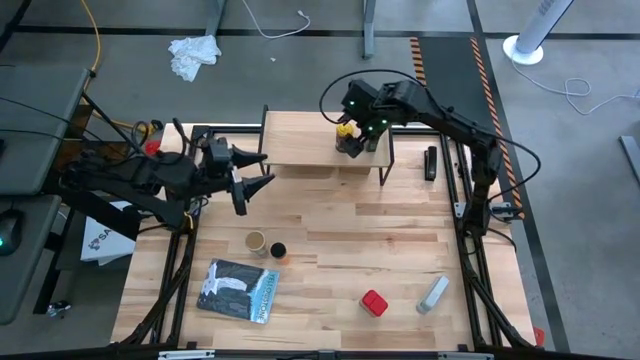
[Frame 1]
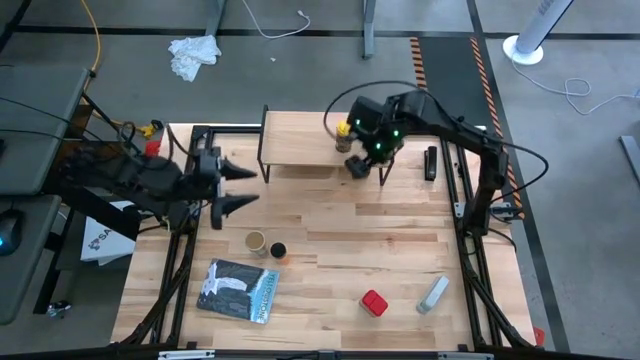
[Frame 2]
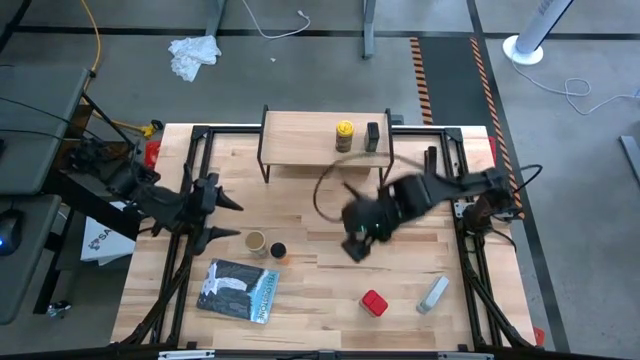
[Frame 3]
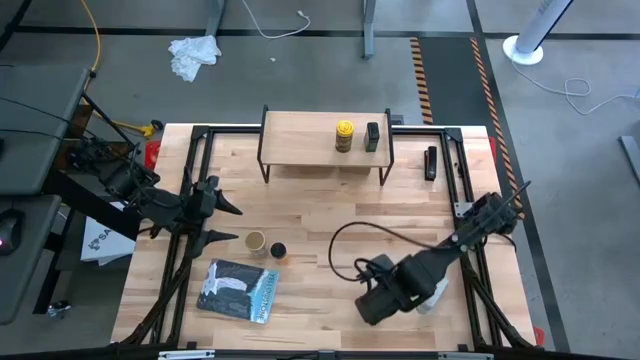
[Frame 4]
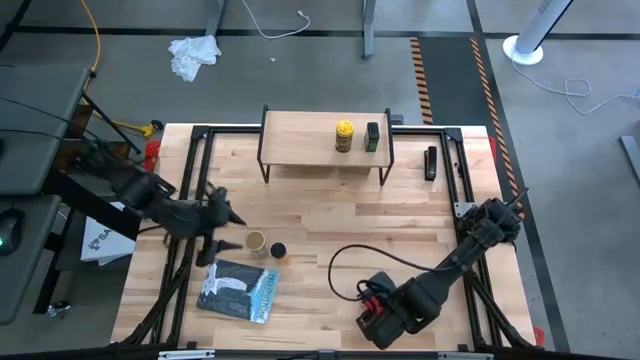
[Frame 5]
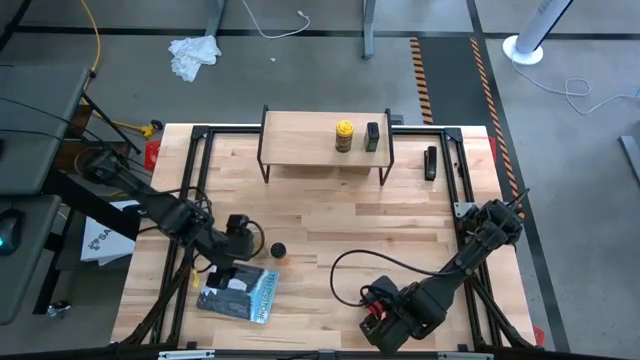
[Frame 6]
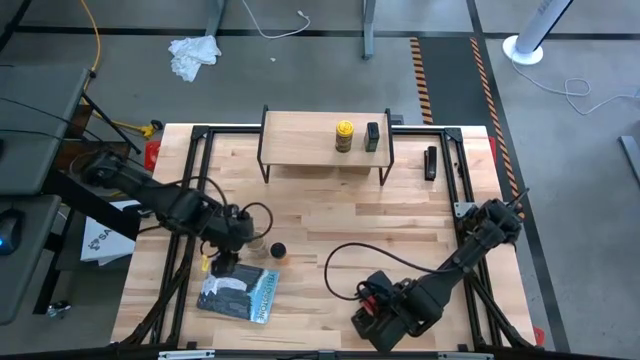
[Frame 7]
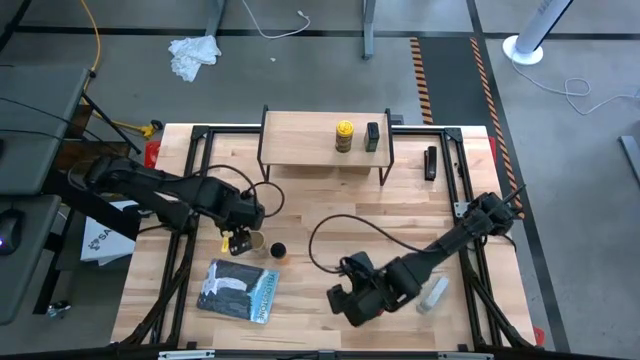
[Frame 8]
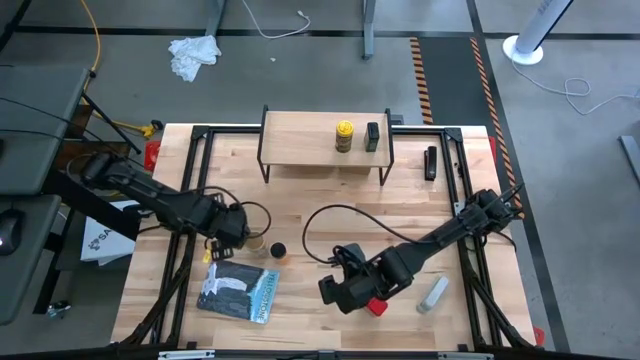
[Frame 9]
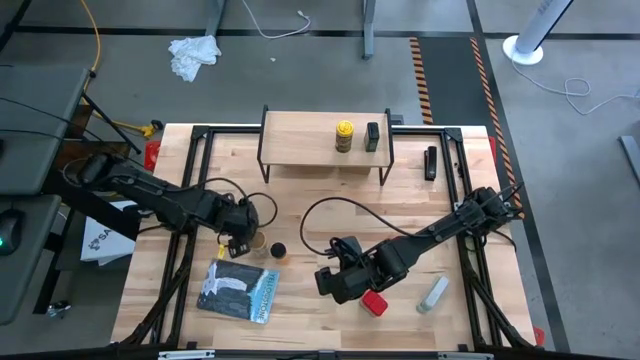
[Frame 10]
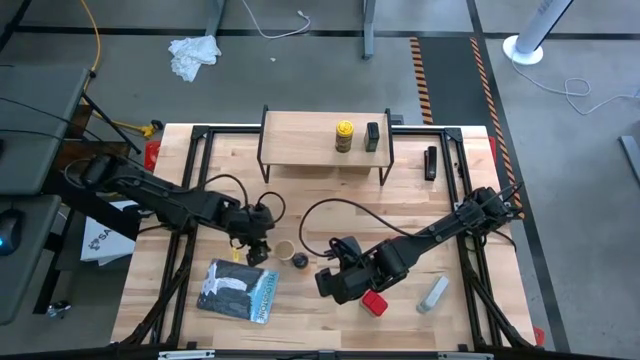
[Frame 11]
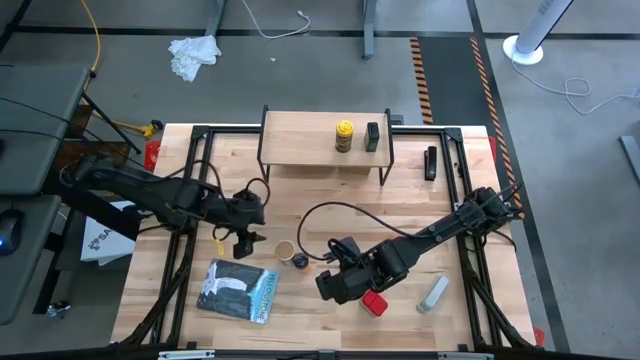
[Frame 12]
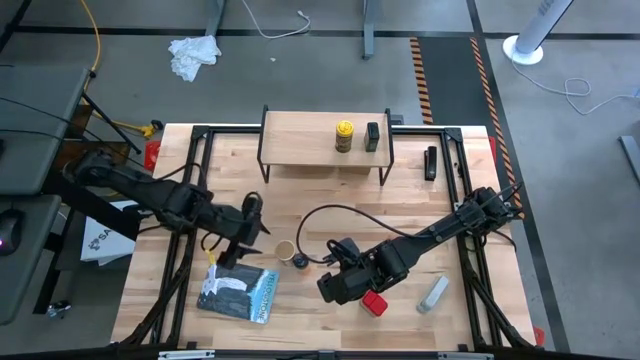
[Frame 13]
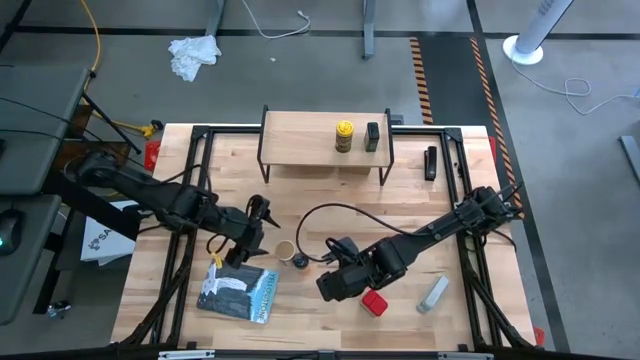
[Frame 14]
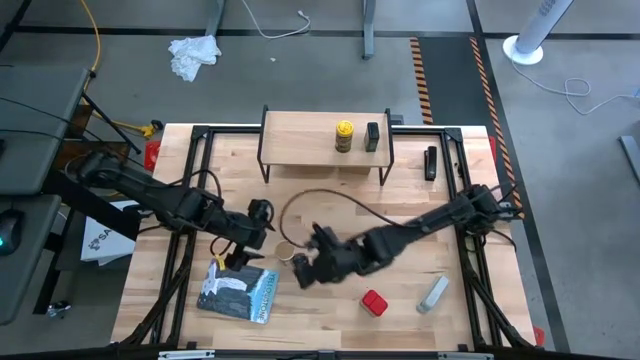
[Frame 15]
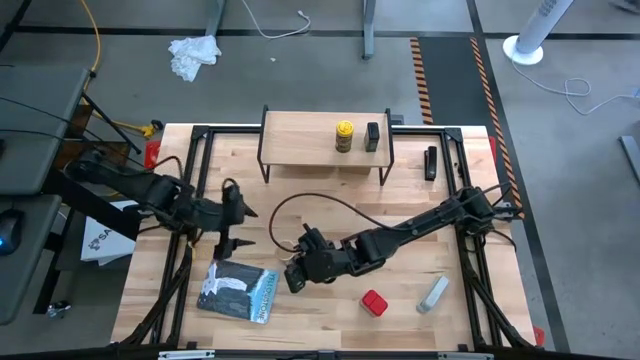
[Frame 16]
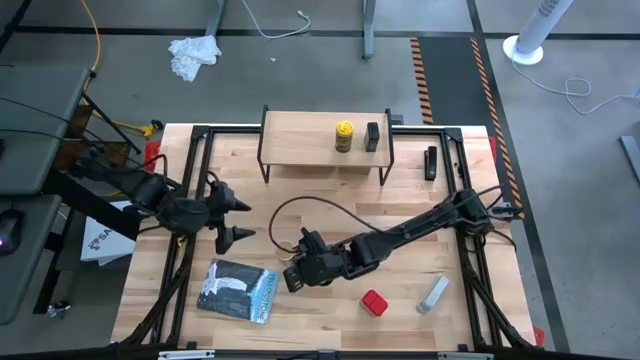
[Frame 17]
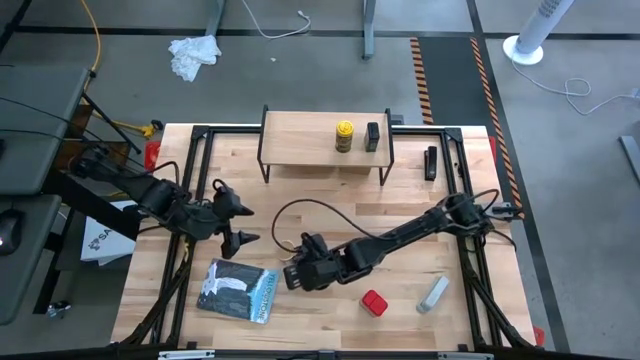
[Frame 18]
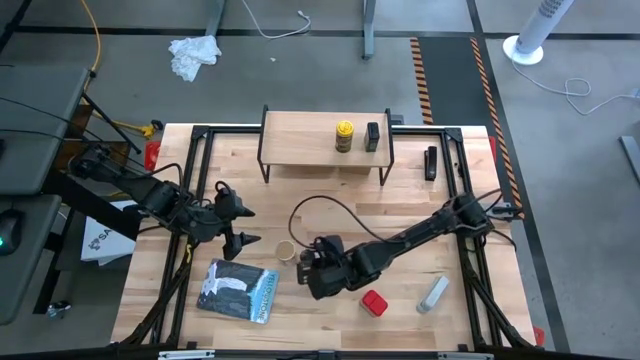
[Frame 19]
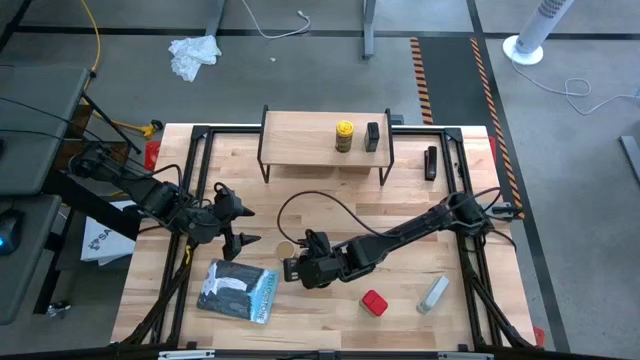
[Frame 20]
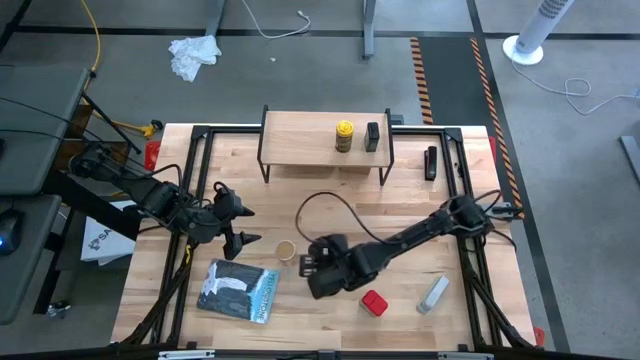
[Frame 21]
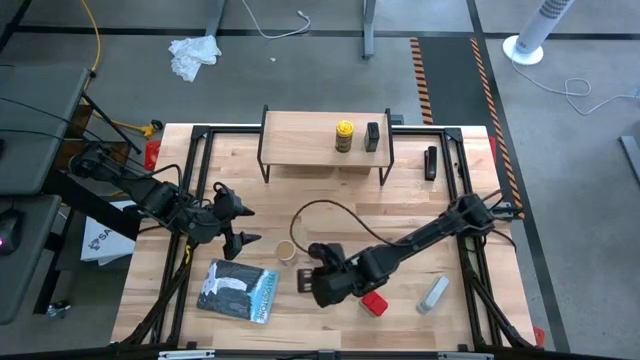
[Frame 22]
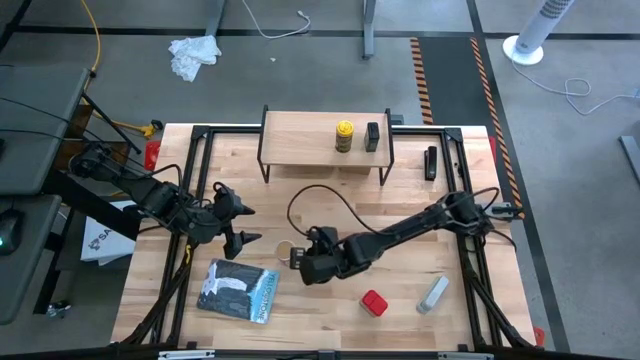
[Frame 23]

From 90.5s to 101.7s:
Task: Shelf spices
Adjust the seasoning bottles on the table

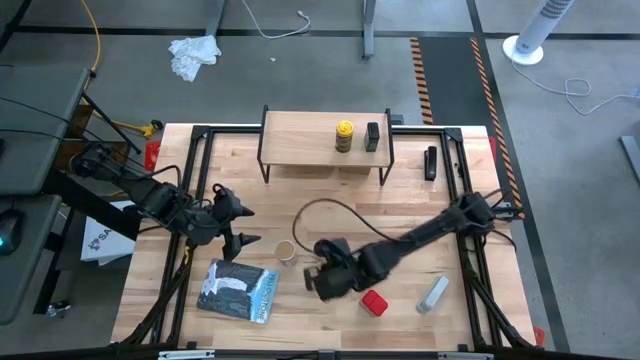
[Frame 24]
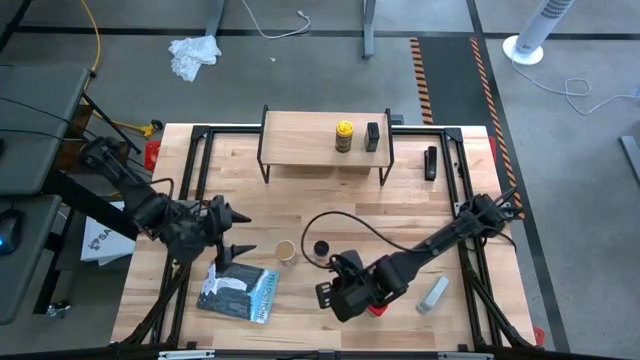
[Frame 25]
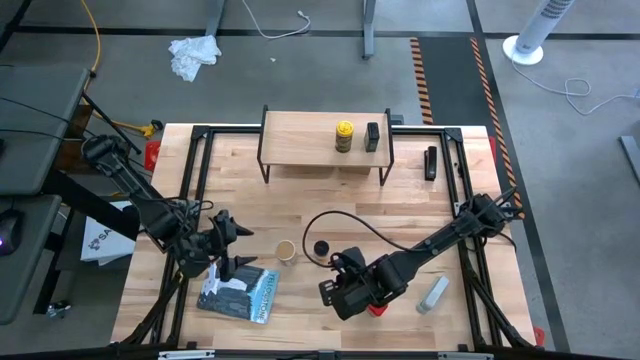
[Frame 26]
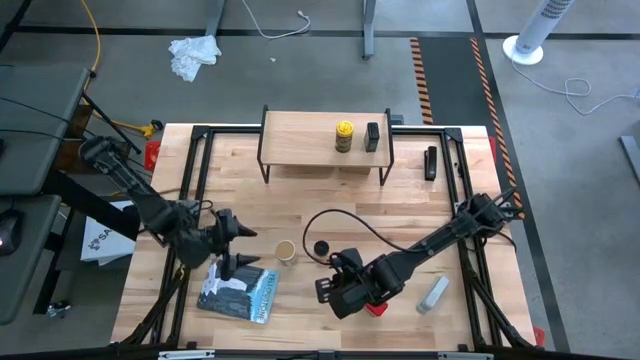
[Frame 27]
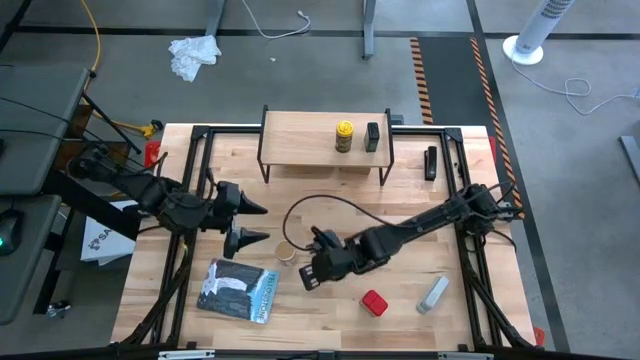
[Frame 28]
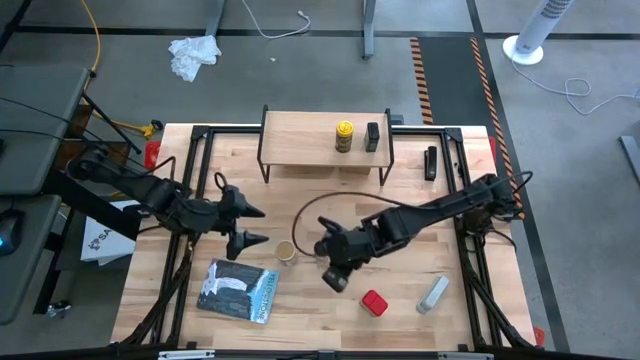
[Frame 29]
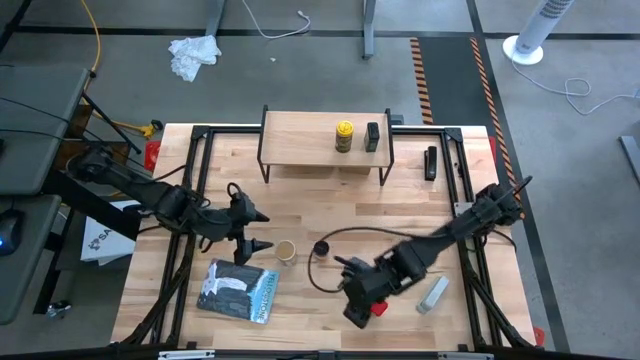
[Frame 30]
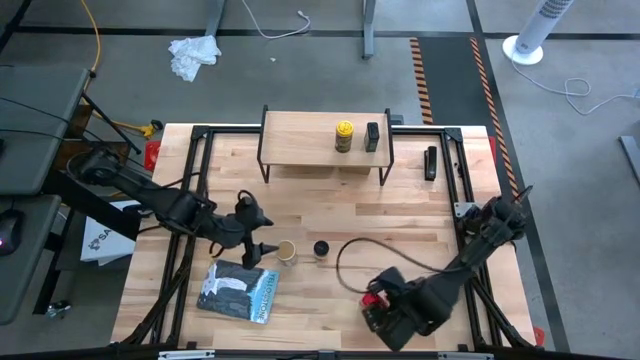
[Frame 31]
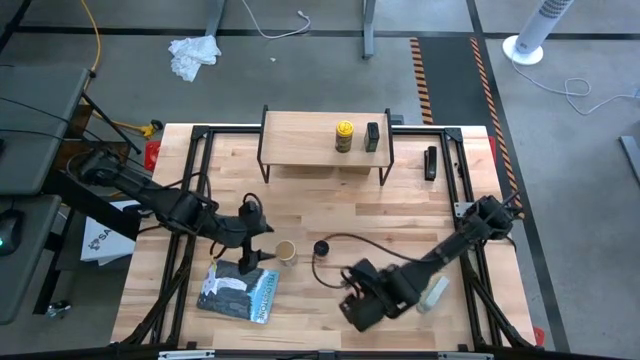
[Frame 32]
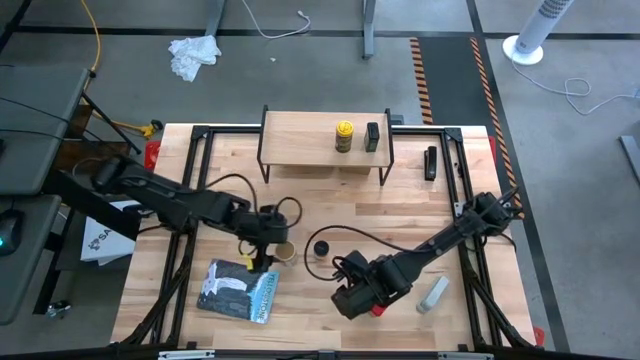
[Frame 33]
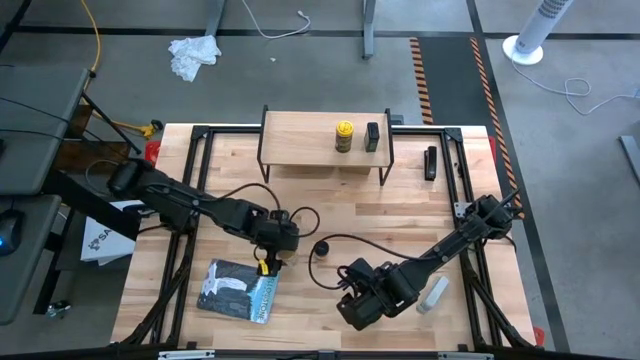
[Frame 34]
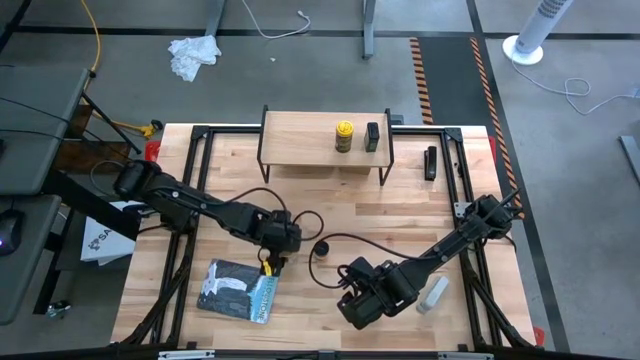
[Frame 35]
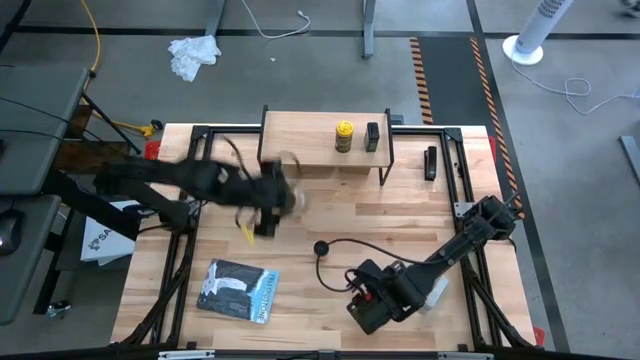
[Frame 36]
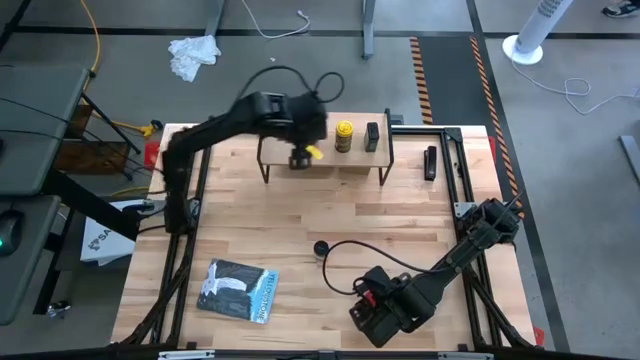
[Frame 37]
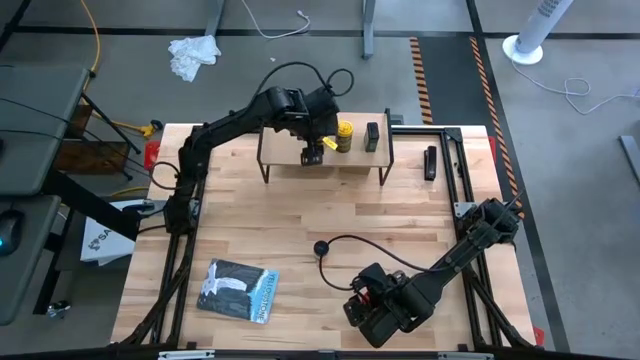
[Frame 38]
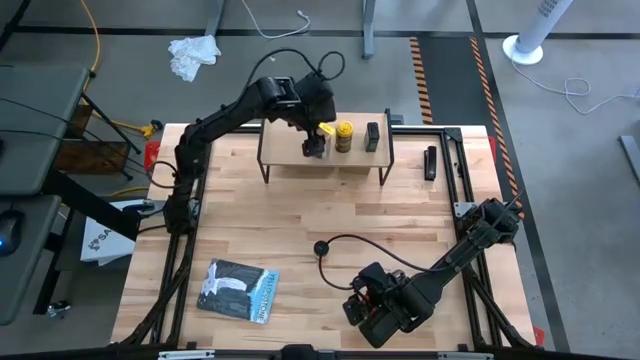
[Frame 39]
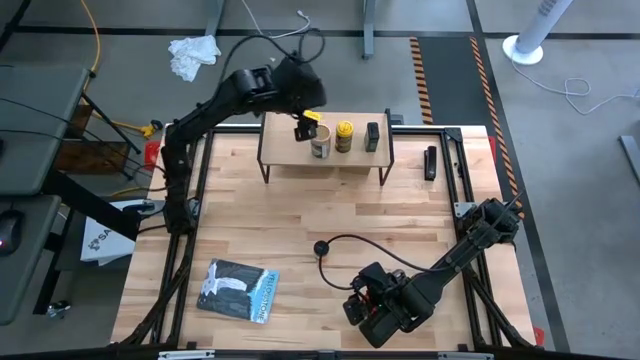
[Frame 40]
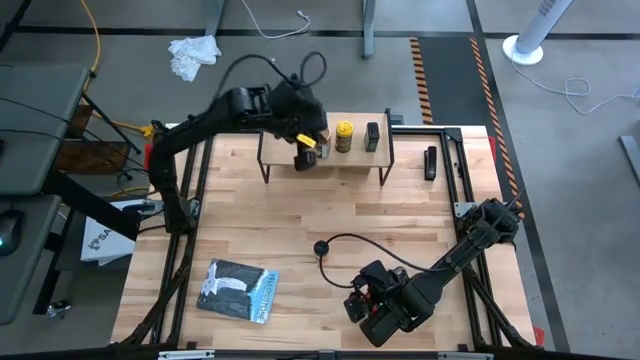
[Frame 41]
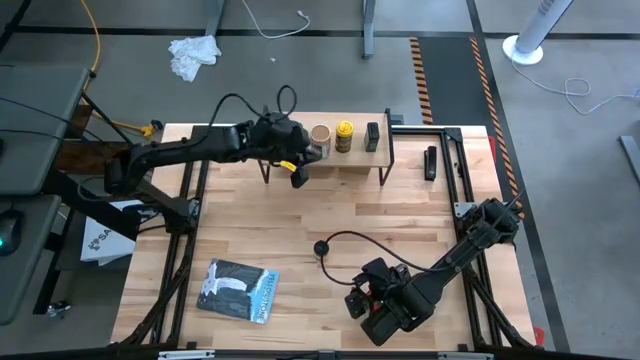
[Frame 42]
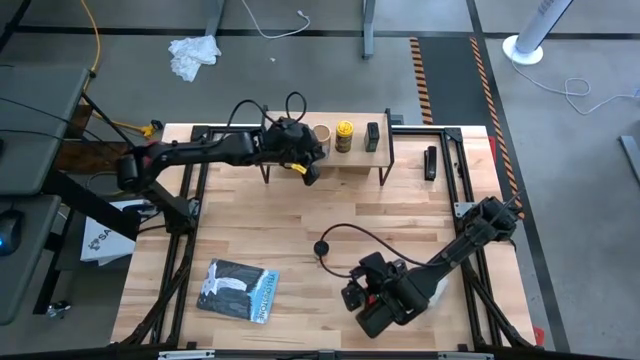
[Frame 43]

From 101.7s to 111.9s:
Put the gold seasoning bottle on the shelf
